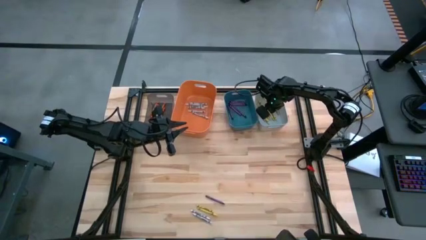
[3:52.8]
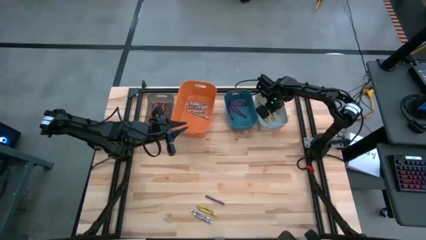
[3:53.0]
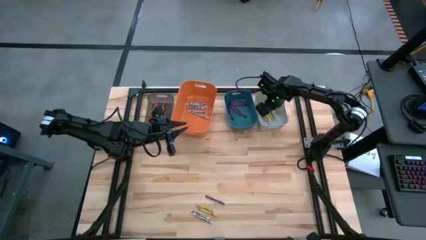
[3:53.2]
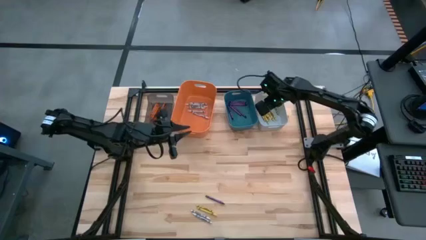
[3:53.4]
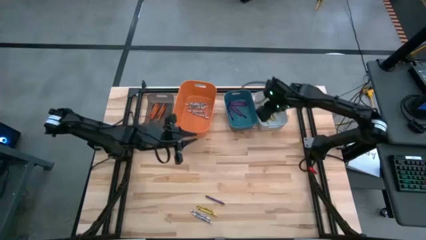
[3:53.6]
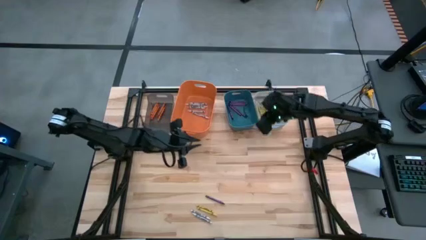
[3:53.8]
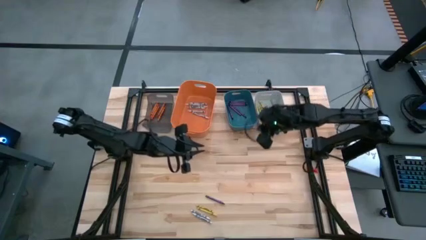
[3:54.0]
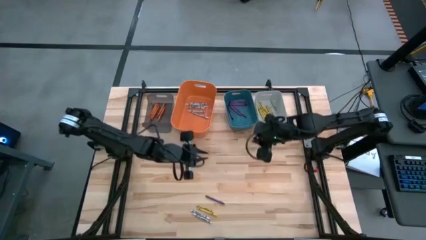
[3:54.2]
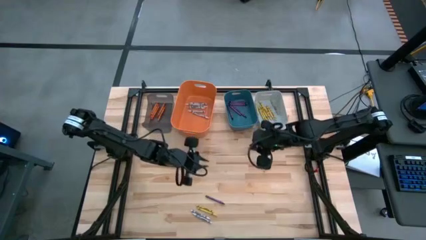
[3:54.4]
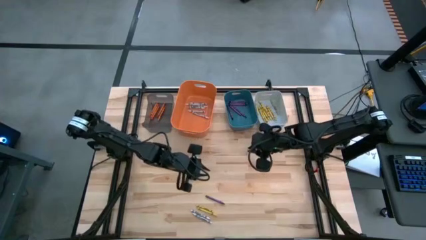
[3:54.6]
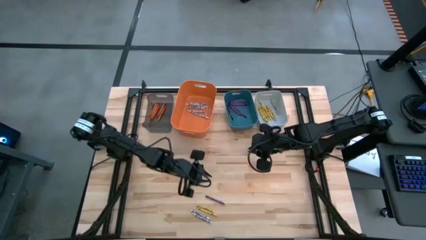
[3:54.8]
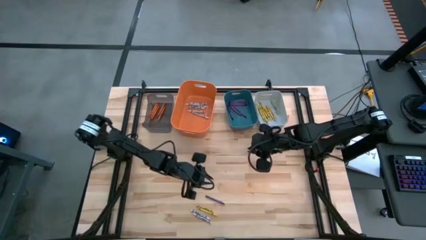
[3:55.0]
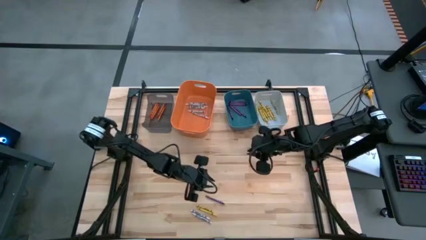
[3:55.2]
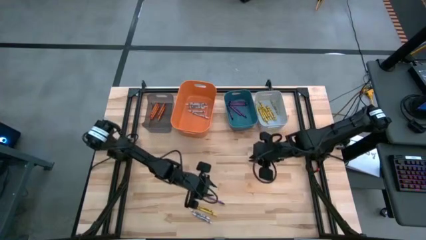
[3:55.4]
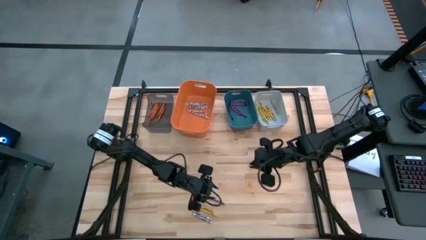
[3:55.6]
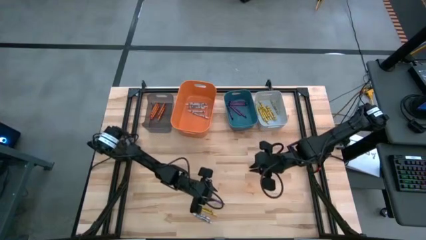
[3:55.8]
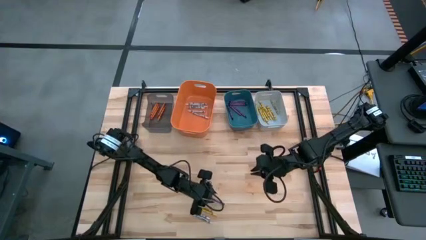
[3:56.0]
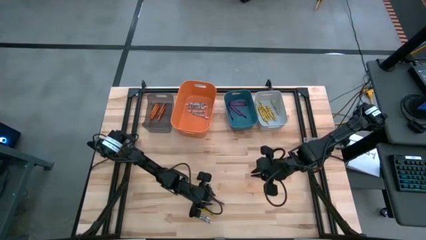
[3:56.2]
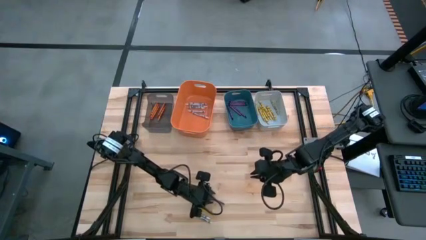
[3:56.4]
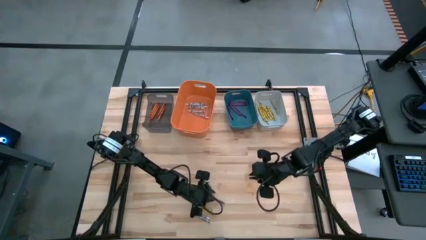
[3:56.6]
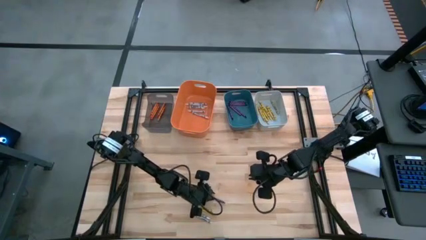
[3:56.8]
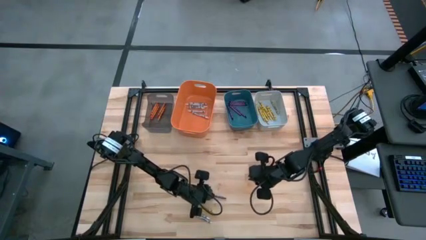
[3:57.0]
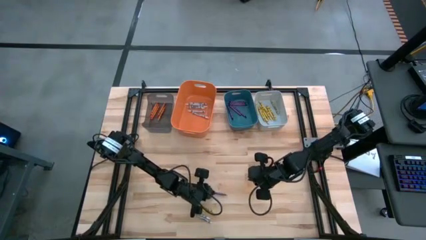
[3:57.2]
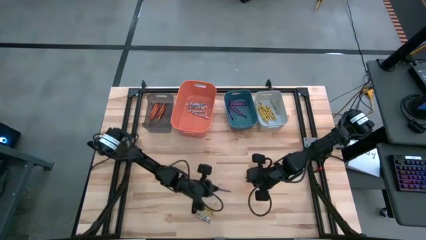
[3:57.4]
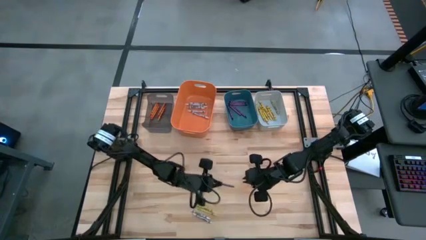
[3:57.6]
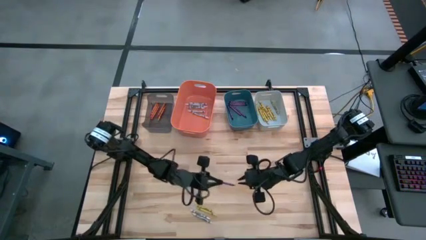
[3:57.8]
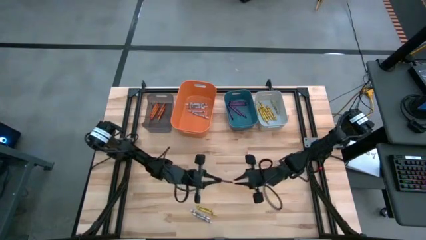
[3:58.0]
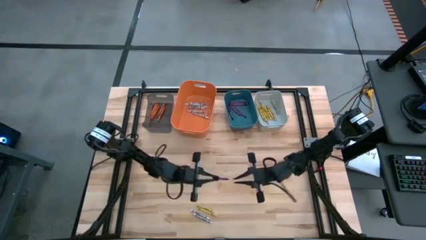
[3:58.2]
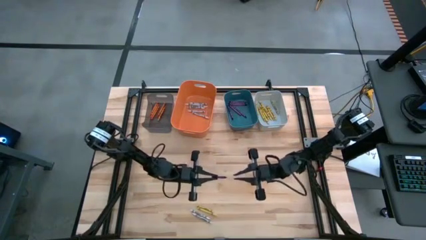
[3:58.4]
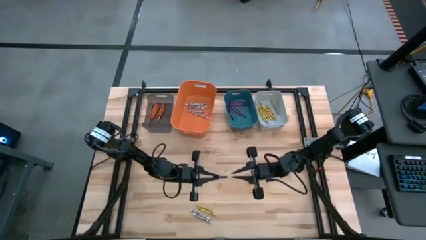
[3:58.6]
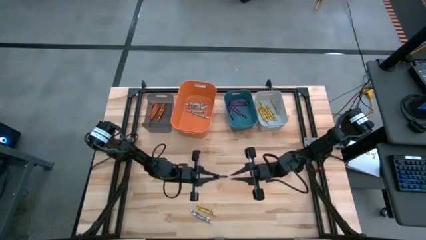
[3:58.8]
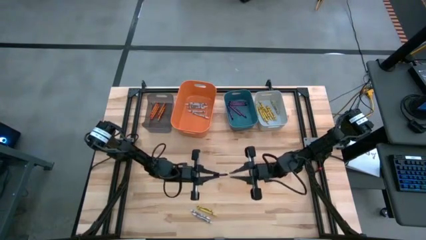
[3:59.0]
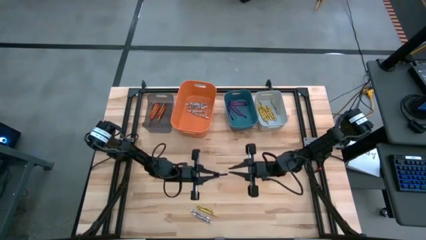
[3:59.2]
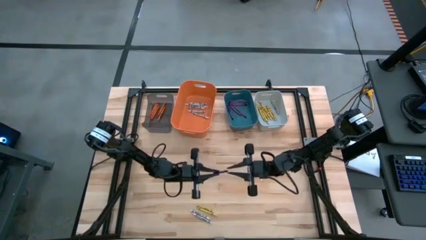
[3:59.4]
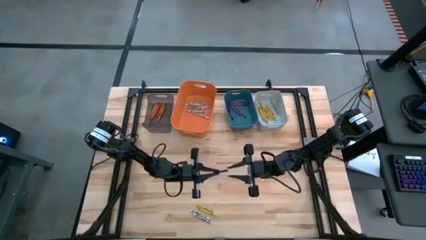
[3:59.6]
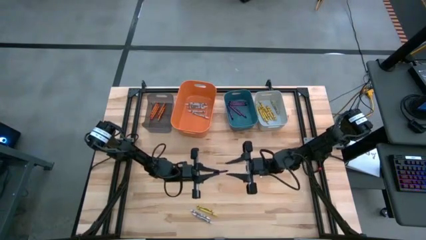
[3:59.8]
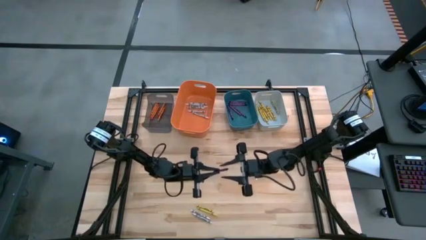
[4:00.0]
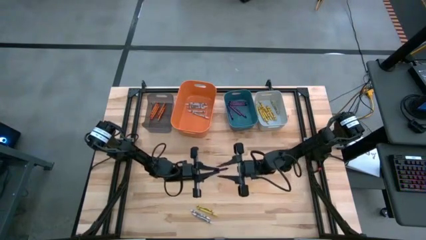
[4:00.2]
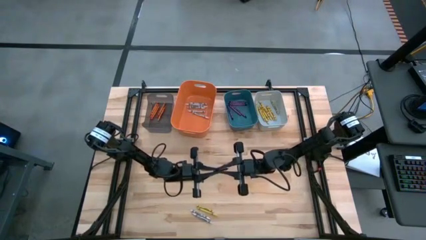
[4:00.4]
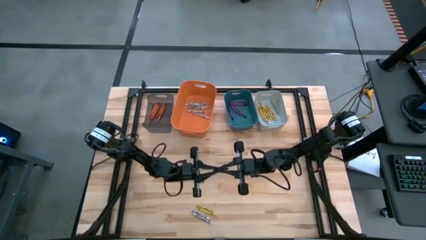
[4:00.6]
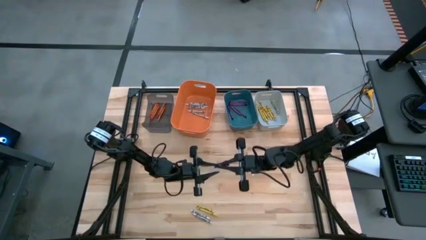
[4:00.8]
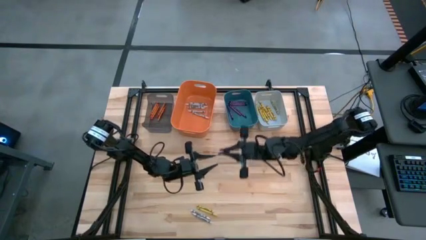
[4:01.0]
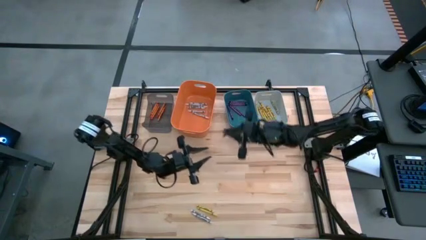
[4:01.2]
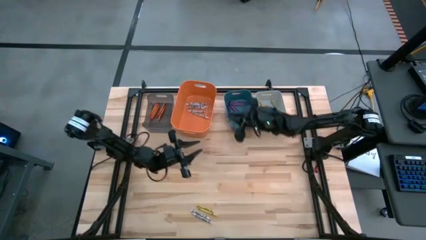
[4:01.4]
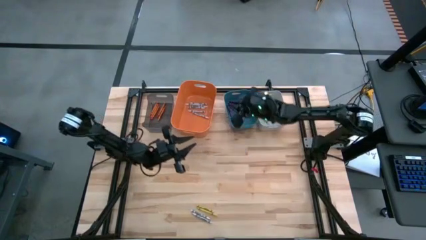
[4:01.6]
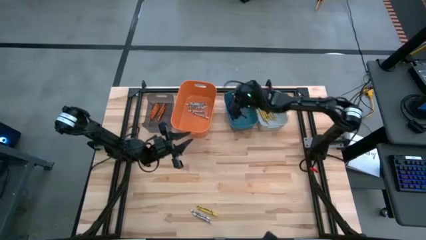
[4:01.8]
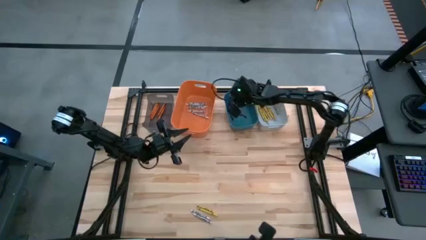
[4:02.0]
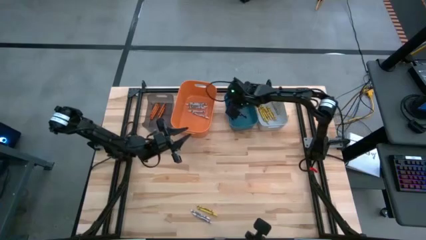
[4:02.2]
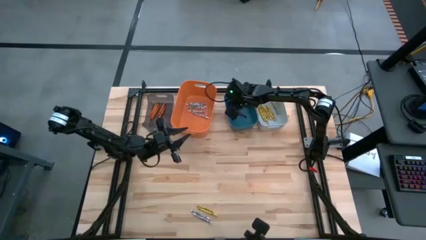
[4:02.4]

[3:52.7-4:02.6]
Task: Sort crayons
Put the purple crayon into the blue bin
